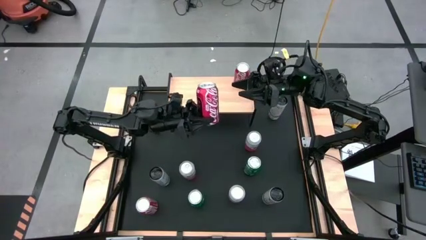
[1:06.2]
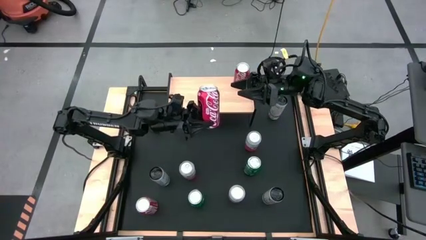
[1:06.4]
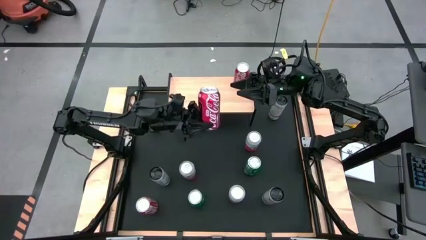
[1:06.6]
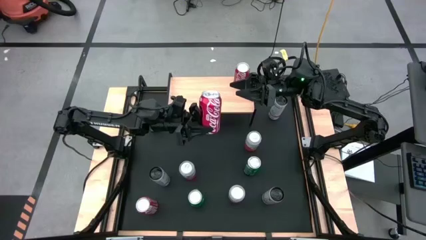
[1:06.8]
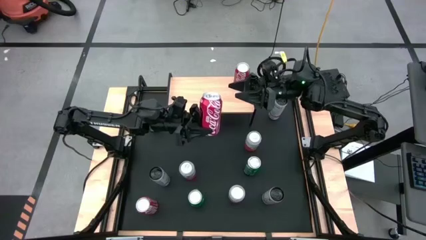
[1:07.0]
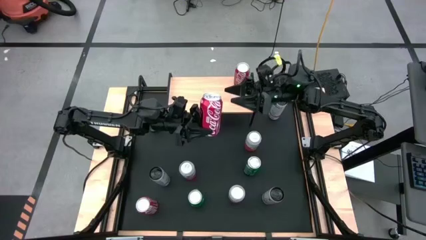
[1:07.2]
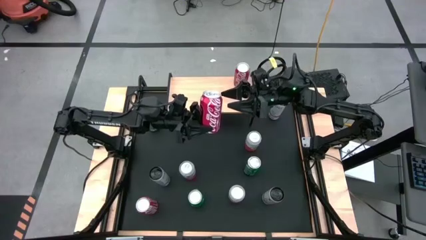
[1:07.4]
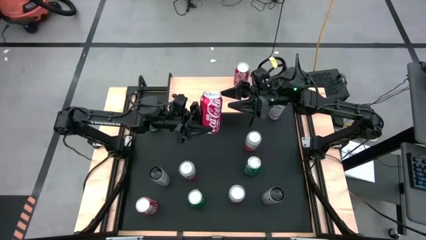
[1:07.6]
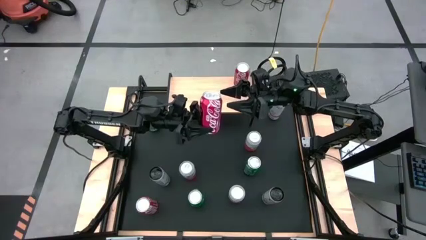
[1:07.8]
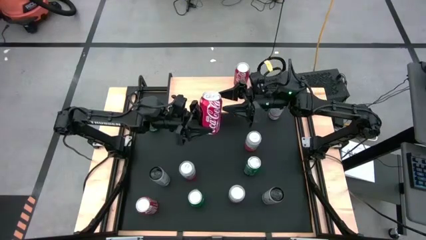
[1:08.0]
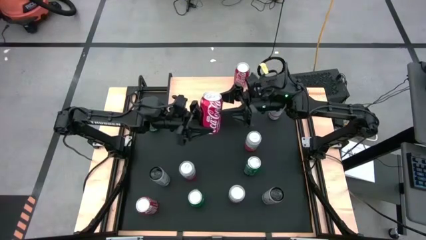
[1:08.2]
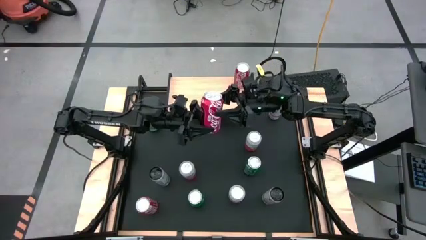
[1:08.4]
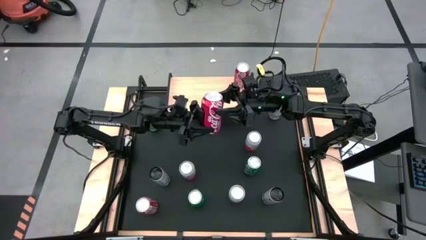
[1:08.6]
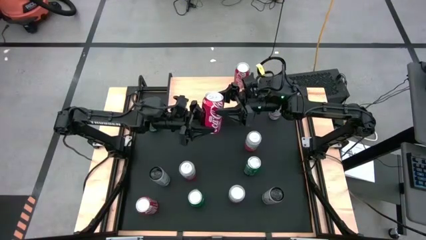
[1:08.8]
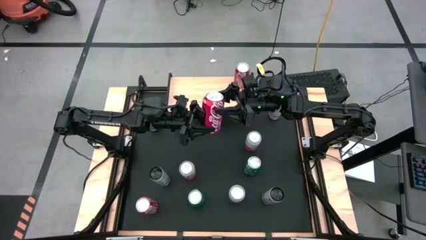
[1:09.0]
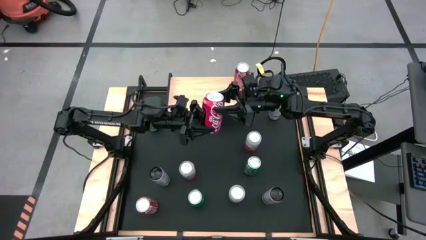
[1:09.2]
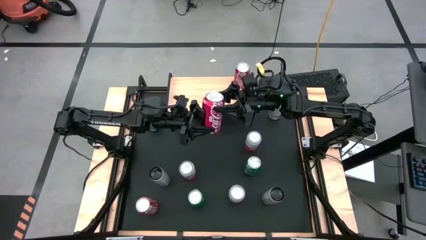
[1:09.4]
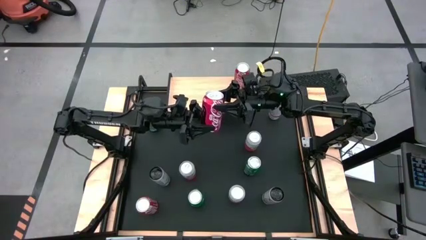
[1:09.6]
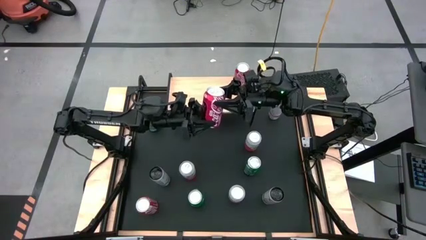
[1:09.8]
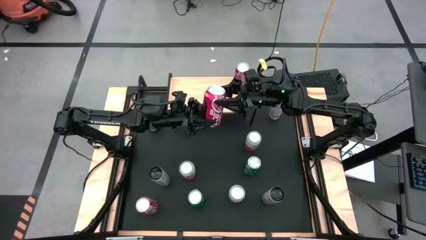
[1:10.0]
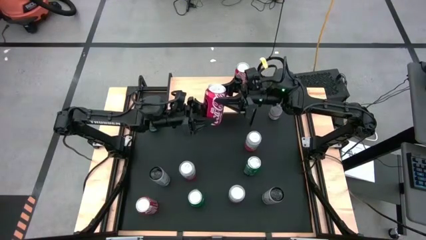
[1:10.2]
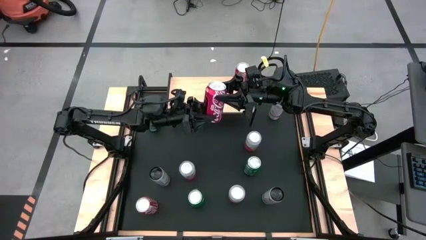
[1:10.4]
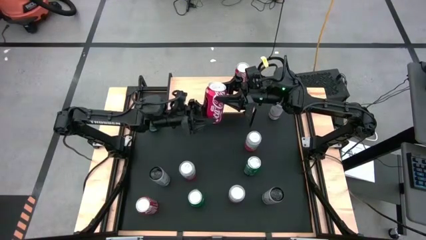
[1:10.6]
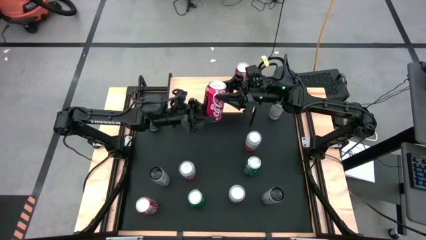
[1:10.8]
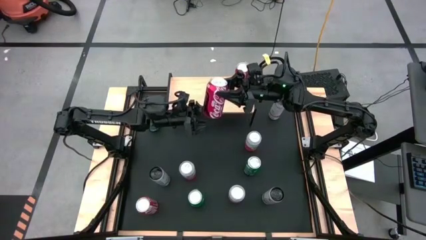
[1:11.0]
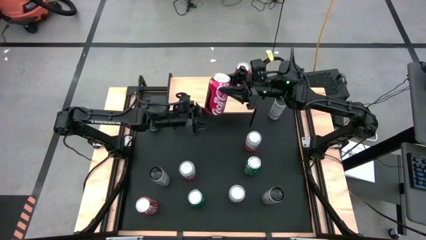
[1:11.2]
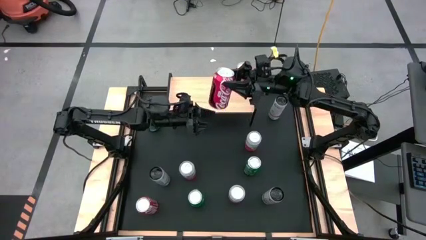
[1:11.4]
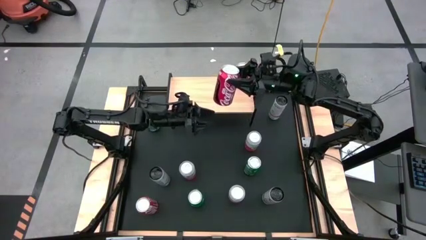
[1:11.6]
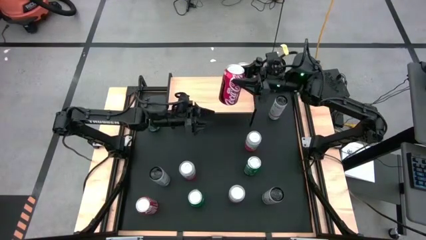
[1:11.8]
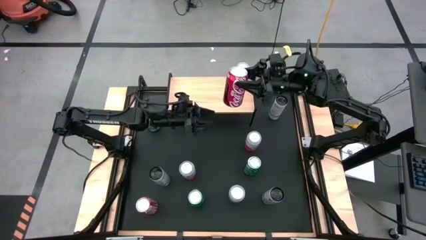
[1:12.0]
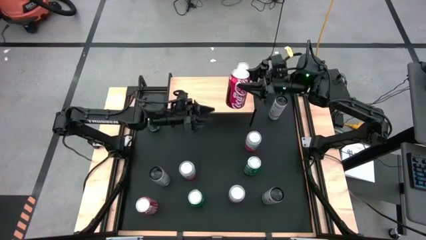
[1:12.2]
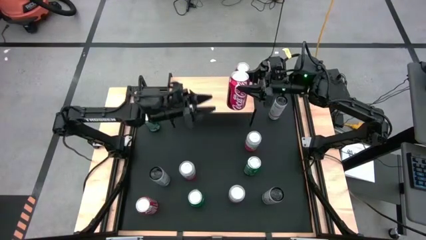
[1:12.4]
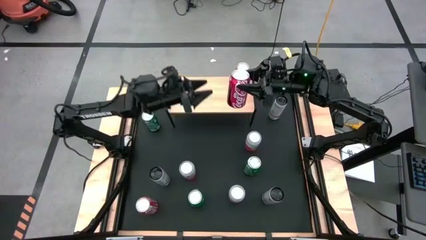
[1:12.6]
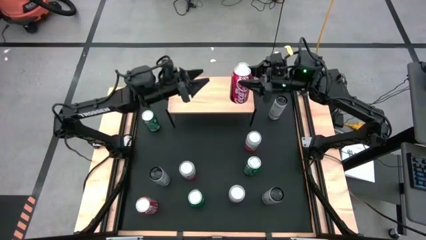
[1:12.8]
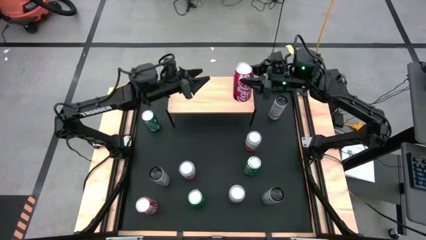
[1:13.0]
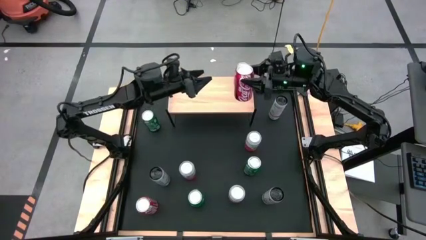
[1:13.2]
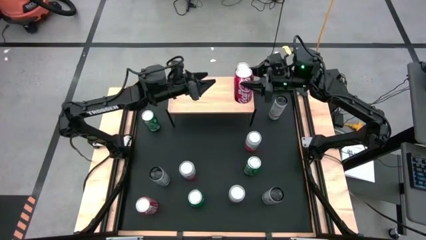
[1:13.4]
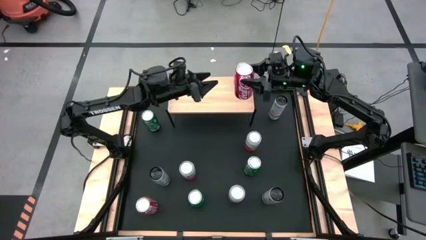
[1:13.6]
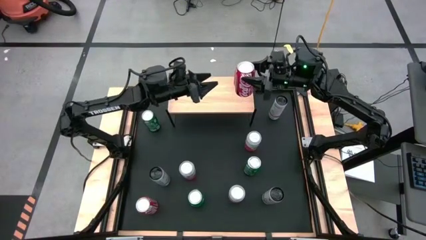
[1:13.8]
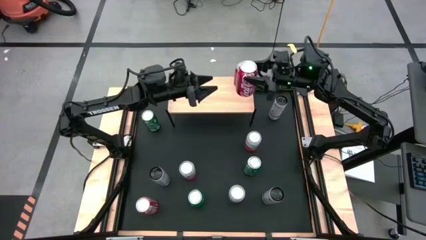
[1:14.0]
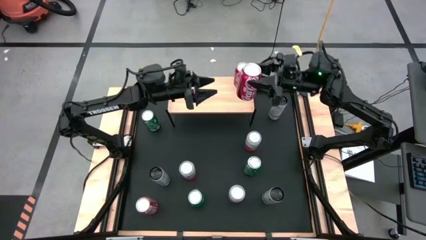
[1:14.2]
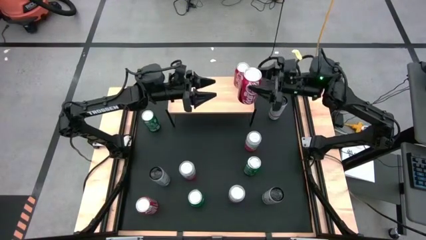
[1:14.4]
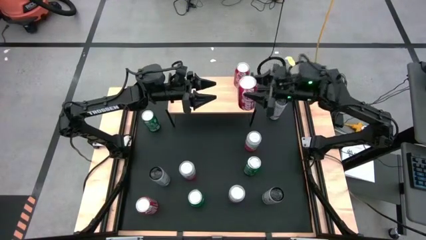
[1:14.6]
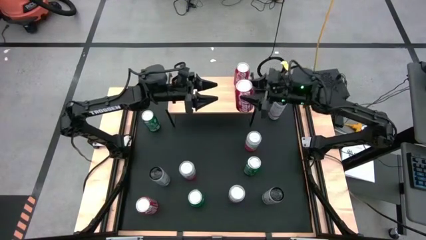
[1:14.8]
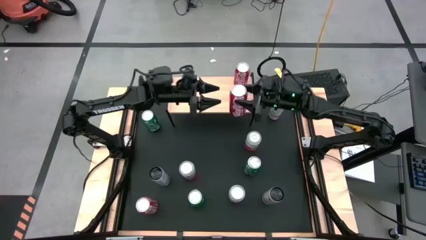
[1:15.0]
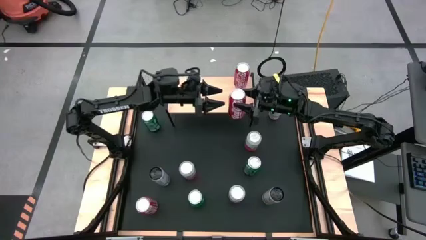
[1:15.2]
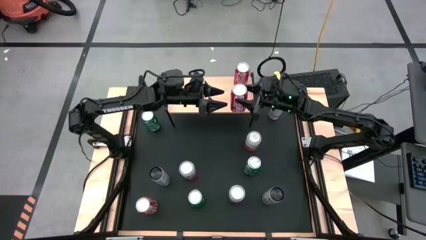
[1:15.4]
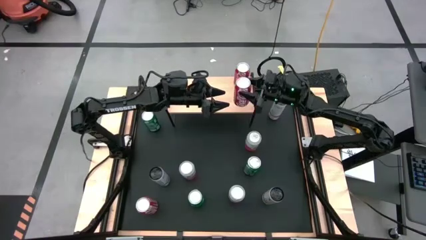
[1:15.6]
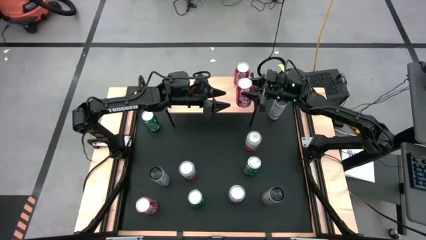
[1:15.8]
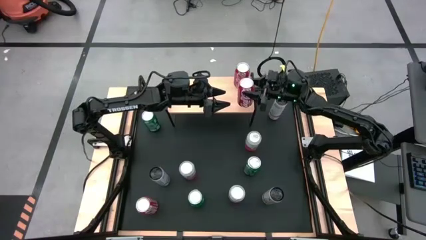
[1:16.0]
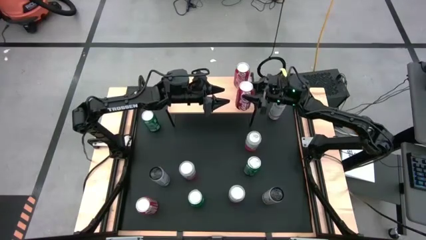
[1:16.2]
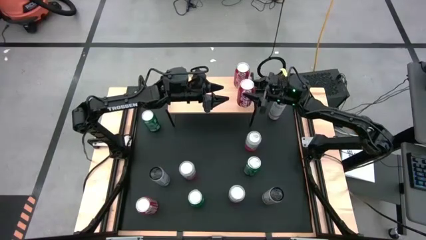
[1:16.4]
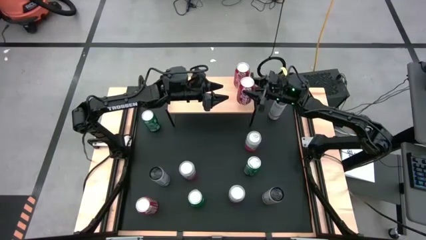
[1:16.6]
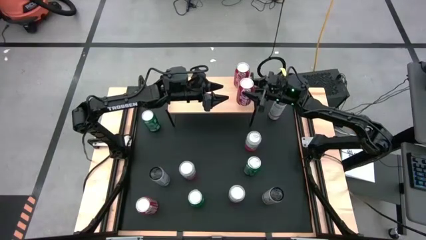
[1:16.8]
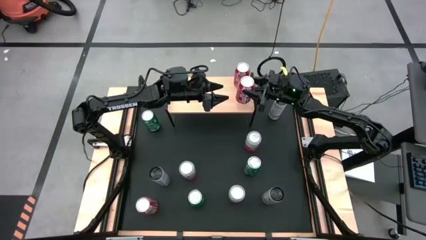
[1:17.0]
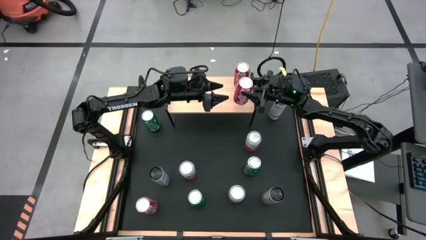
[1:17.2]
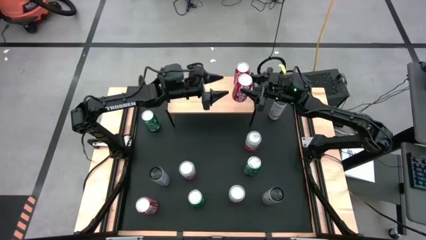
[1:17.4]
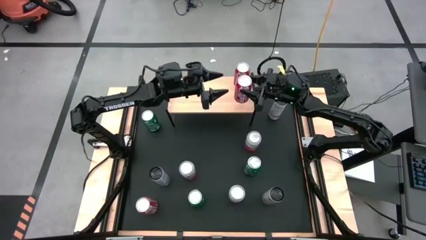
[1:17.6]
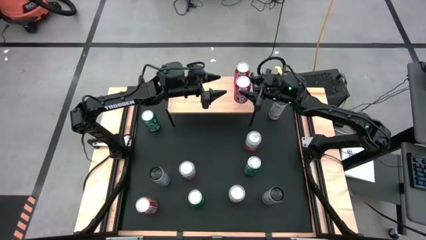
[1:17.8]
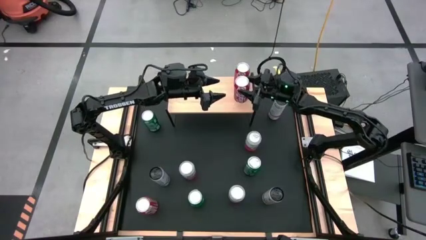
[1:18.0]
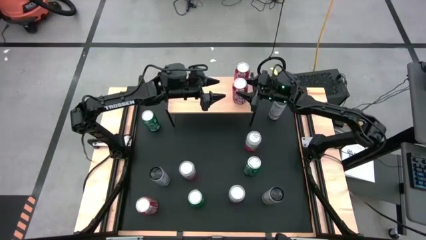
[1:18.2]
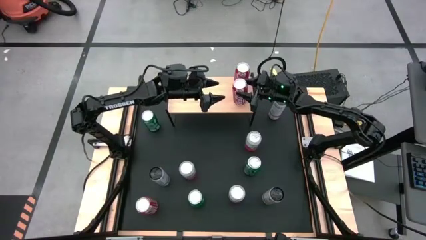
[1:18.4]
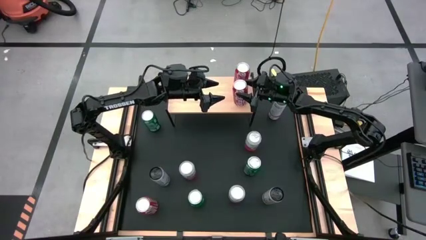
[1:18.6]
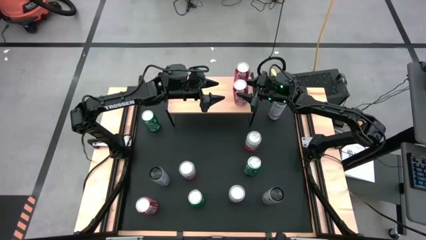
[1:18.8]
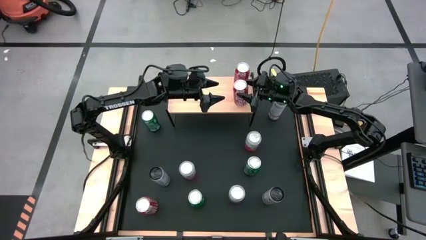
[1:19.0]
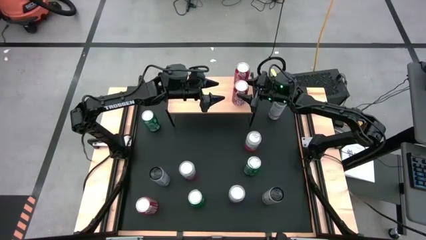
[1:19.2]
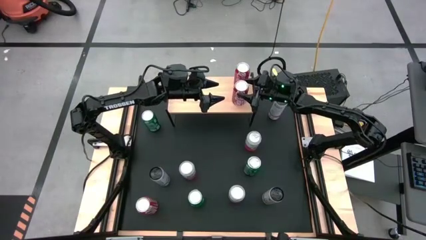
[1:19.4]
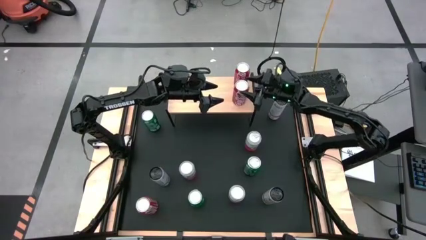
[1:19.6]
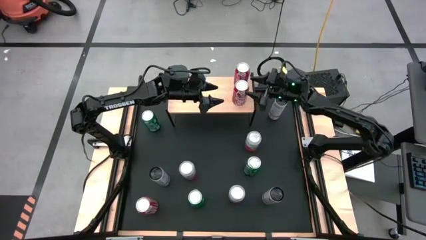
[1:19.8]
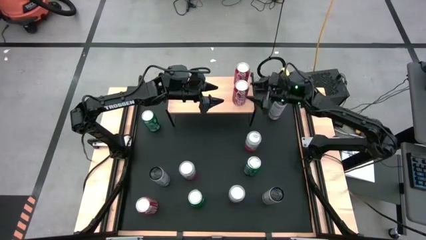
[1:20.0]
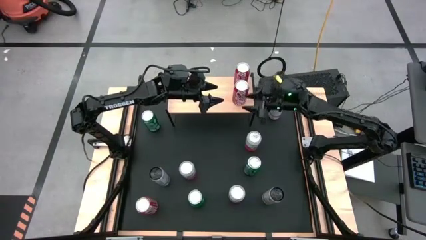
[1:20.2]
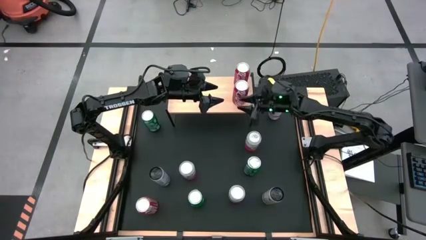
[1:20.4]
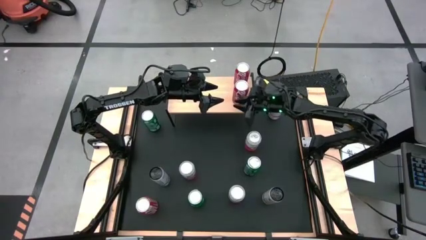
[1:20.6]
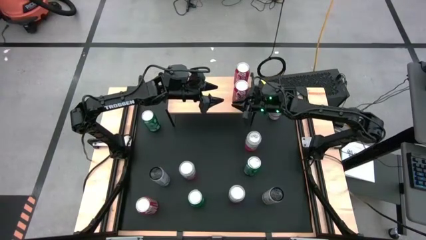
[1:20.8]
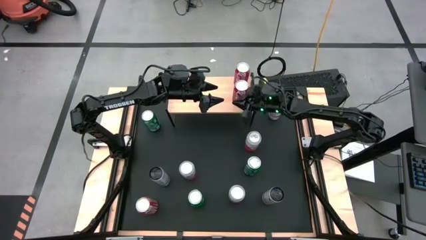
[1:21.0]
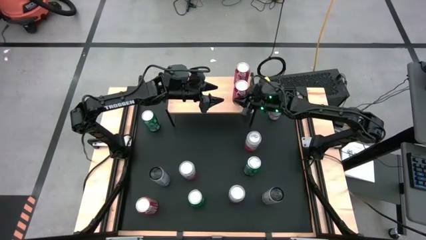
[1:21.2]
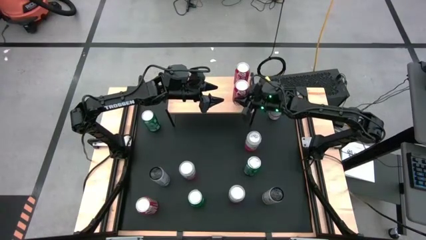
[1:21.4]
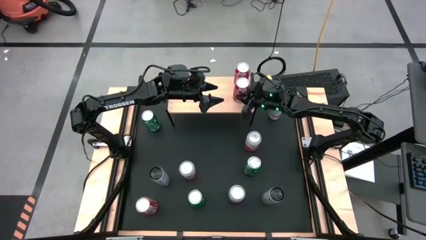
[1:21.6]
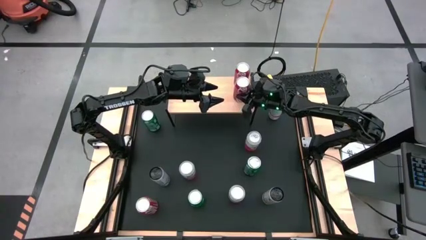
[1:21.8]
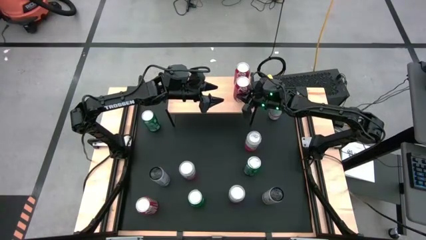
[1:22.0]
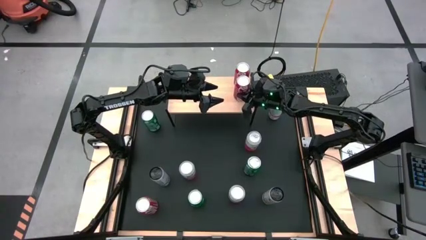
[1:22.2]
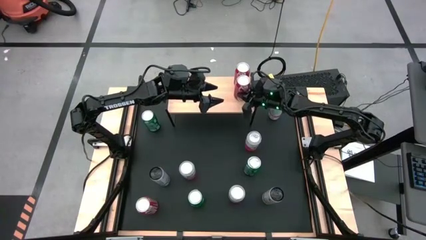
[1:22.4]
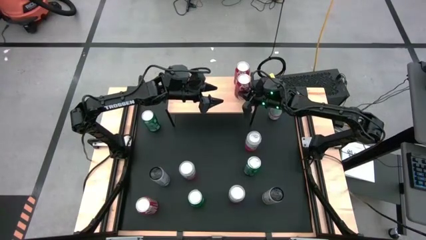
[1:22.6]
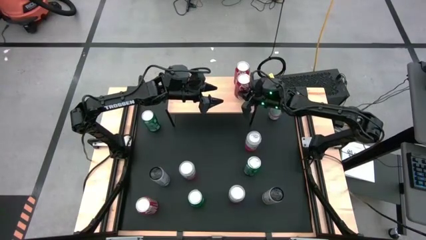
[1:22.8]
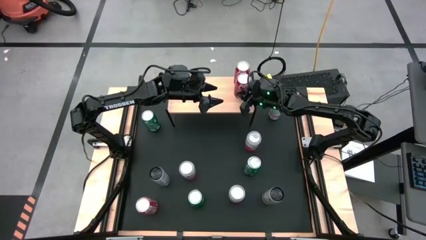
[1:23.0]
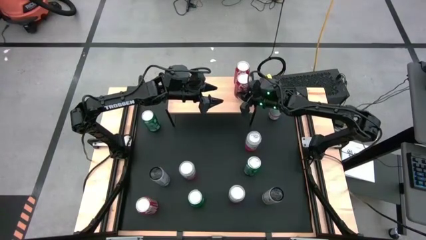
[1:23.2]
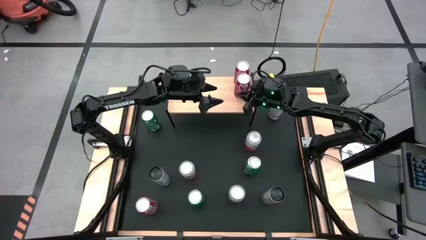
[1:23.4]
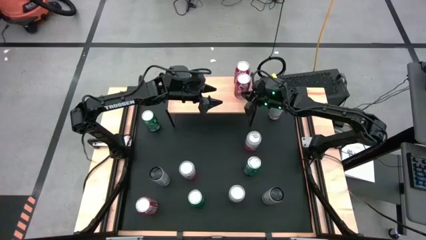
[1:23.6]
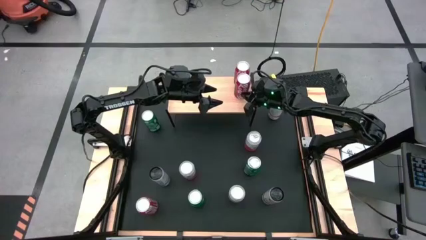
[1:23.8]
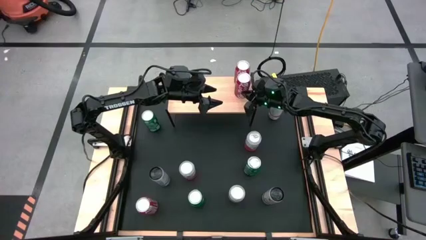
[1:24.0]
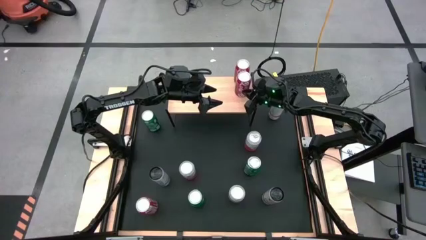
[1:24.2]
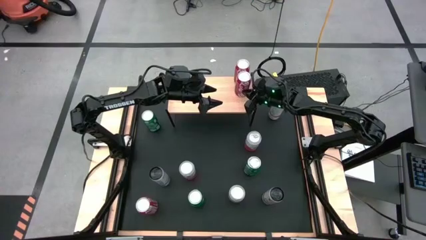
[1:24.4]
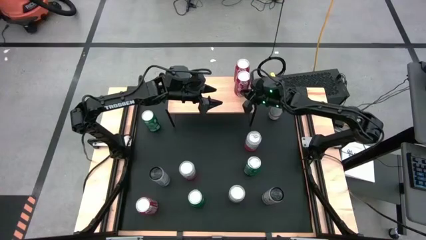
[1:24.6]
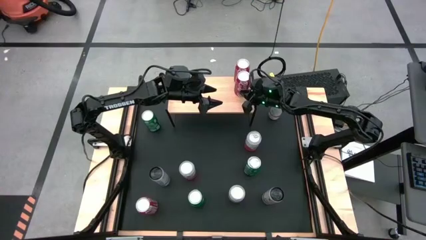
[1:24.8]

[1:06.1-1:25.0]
Task: Place canned beverage on shelf
Put the top red soda can aligned with the other red soda can on the shelf
